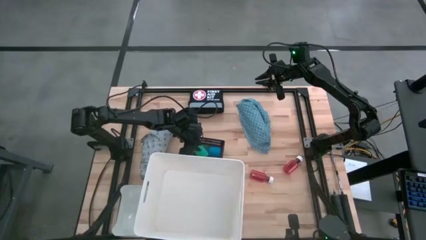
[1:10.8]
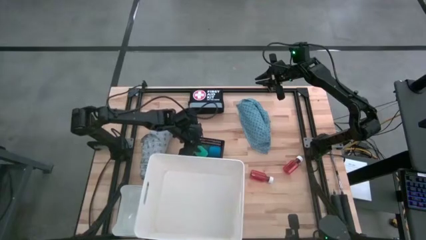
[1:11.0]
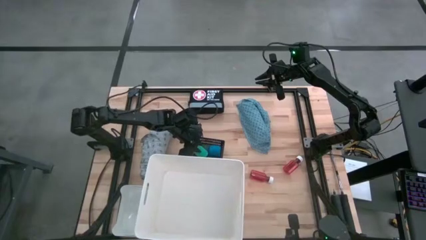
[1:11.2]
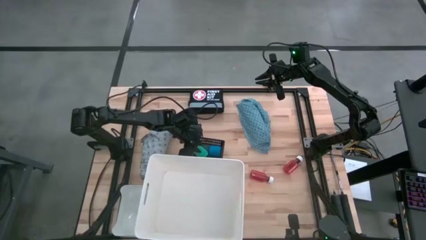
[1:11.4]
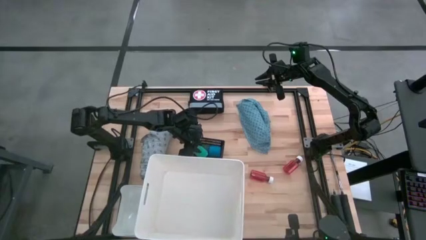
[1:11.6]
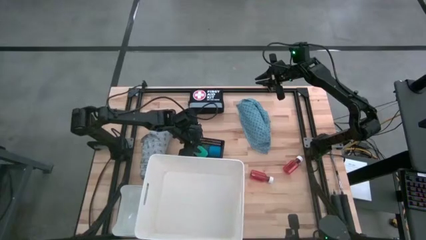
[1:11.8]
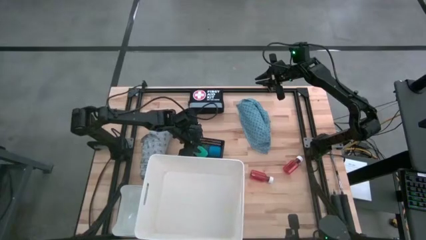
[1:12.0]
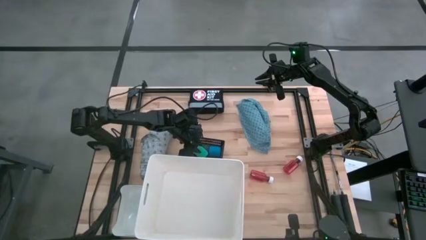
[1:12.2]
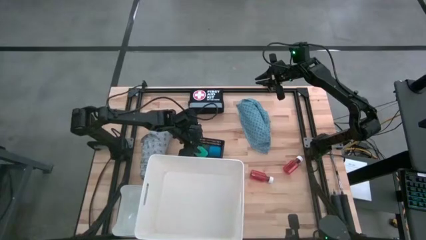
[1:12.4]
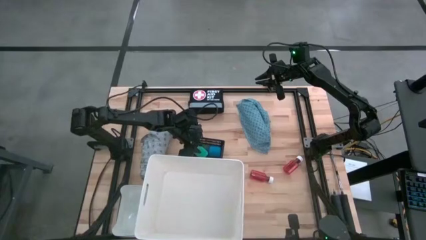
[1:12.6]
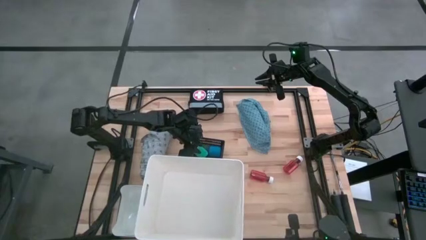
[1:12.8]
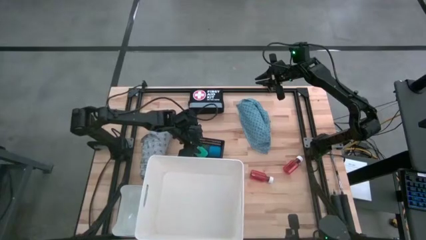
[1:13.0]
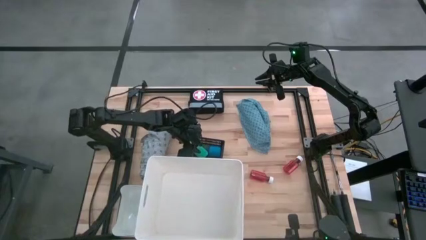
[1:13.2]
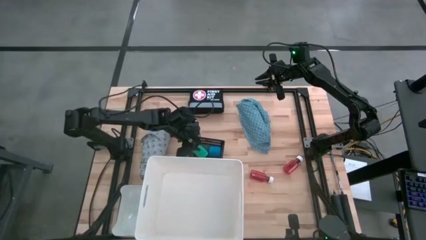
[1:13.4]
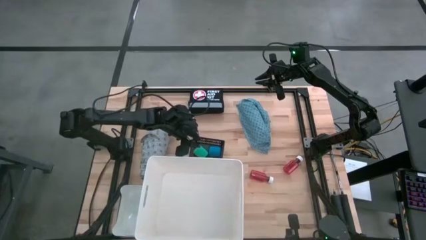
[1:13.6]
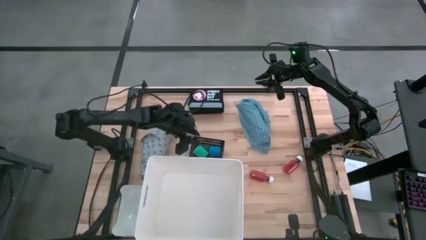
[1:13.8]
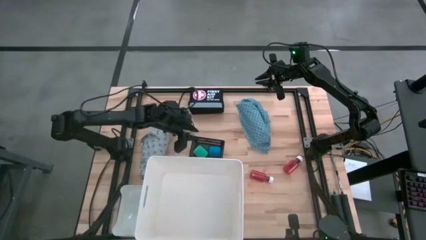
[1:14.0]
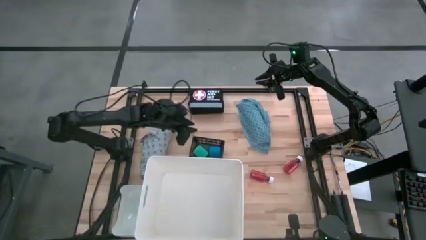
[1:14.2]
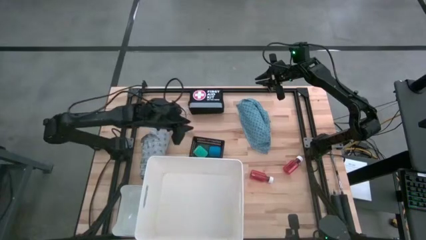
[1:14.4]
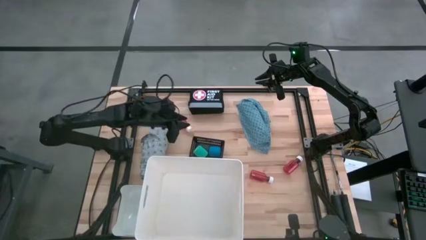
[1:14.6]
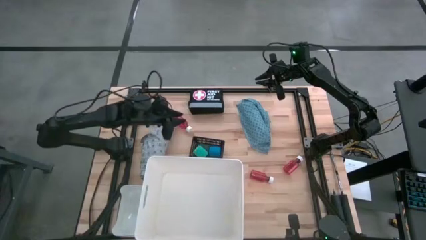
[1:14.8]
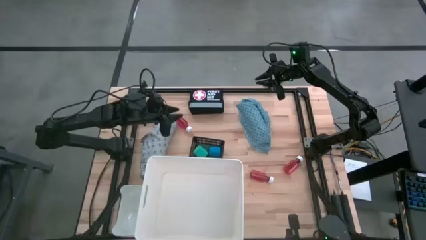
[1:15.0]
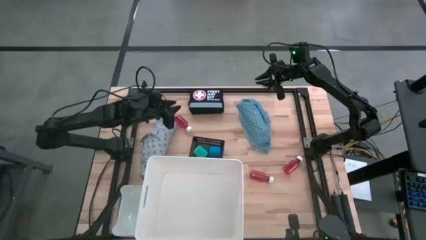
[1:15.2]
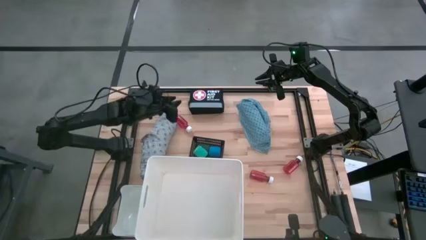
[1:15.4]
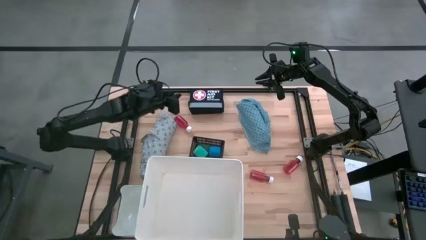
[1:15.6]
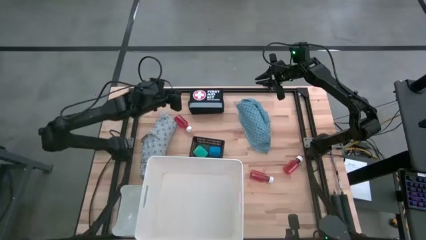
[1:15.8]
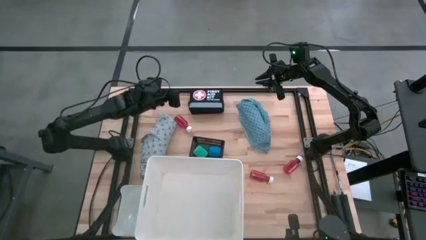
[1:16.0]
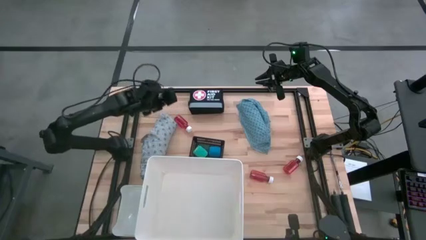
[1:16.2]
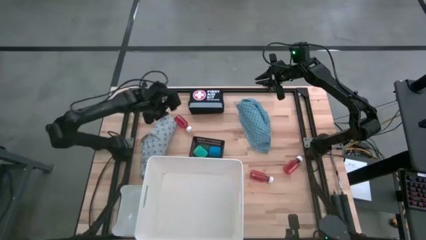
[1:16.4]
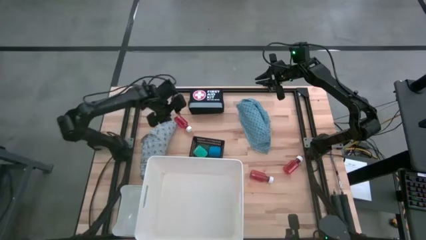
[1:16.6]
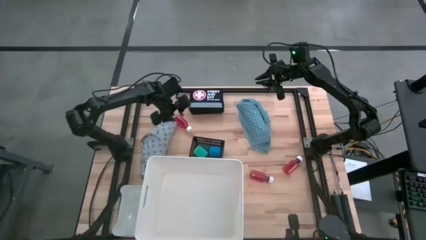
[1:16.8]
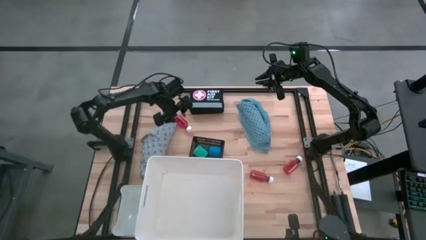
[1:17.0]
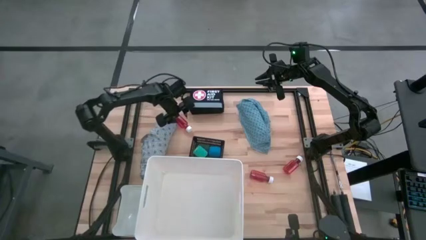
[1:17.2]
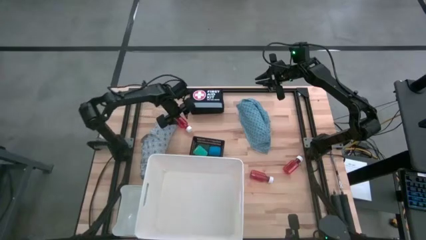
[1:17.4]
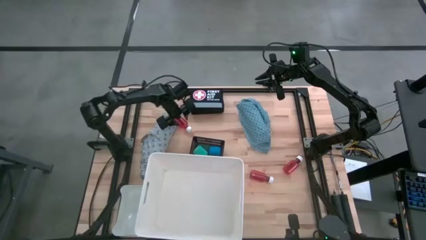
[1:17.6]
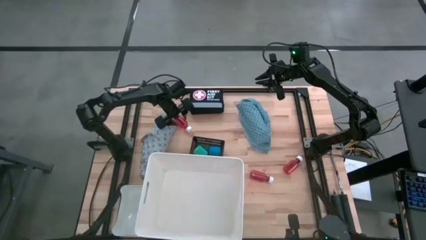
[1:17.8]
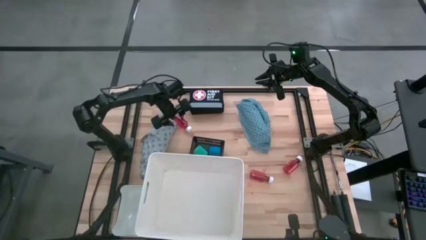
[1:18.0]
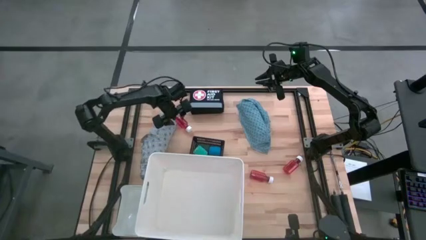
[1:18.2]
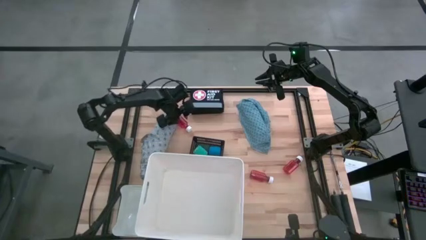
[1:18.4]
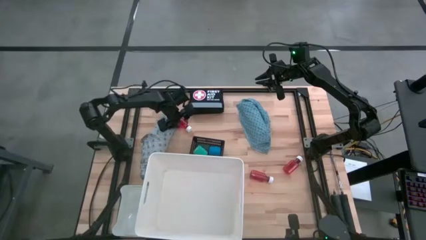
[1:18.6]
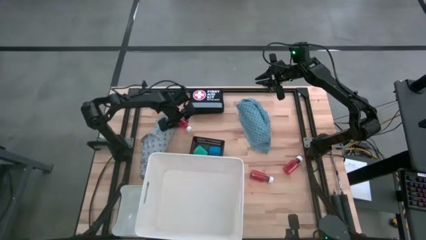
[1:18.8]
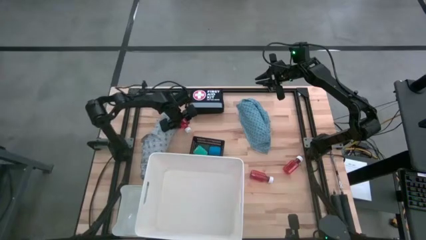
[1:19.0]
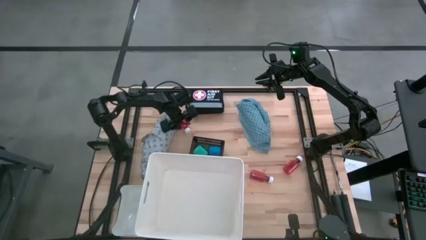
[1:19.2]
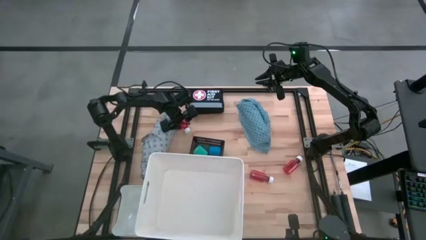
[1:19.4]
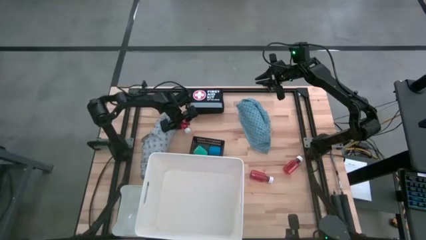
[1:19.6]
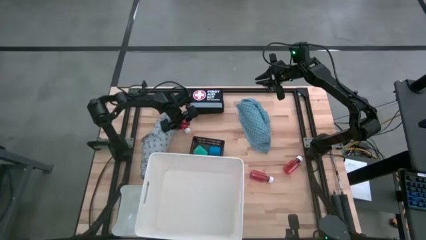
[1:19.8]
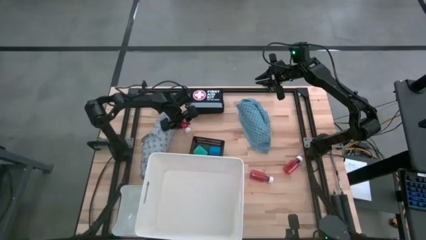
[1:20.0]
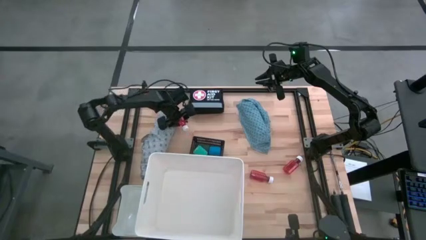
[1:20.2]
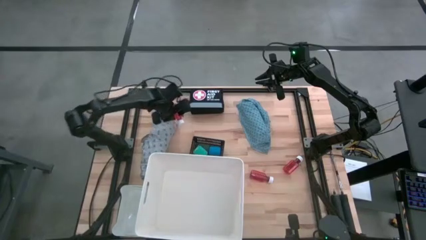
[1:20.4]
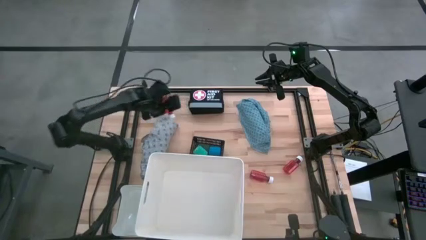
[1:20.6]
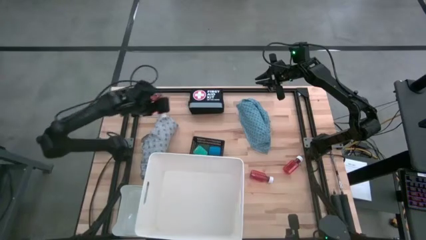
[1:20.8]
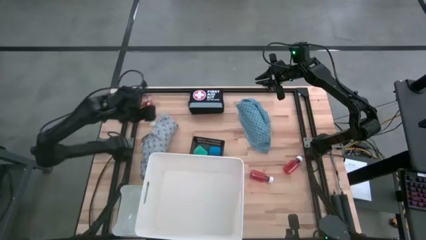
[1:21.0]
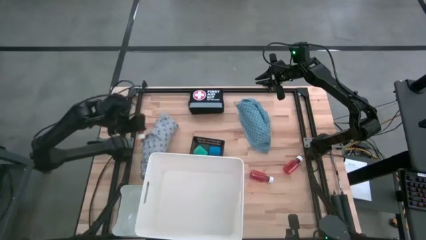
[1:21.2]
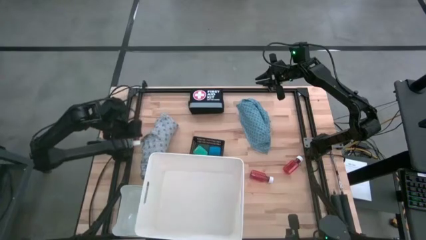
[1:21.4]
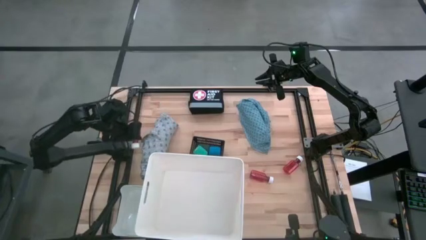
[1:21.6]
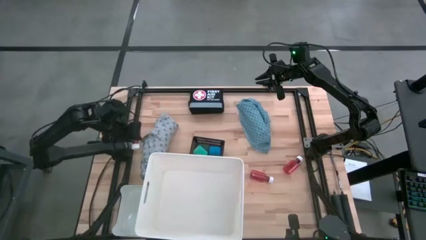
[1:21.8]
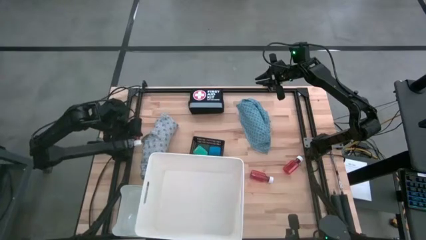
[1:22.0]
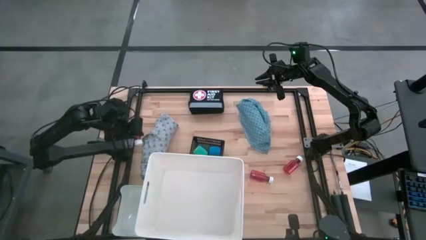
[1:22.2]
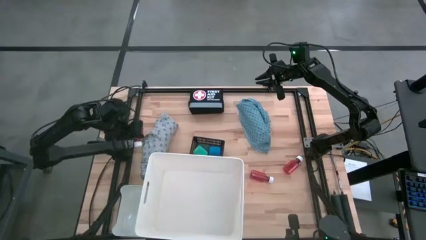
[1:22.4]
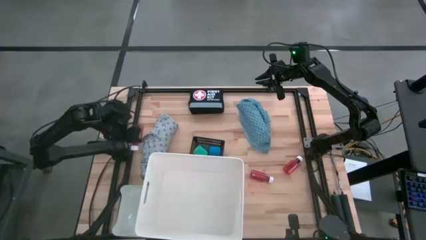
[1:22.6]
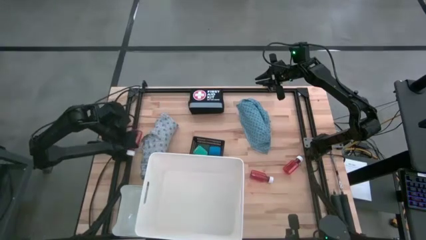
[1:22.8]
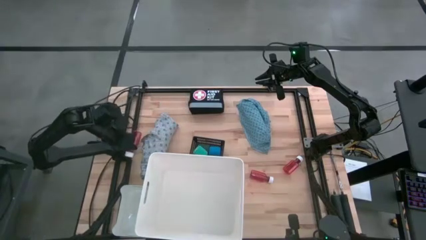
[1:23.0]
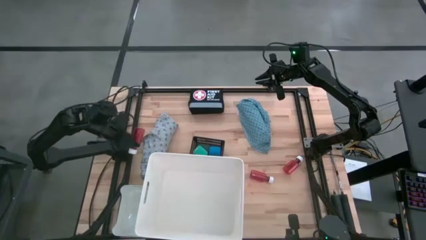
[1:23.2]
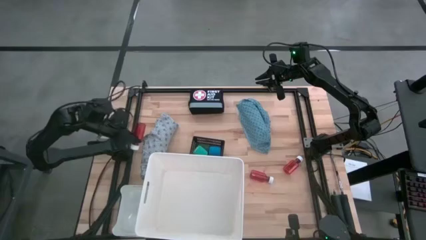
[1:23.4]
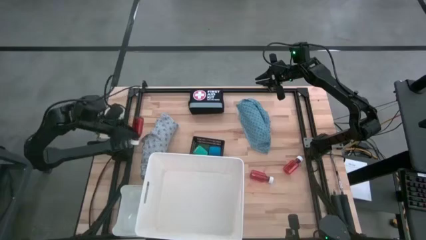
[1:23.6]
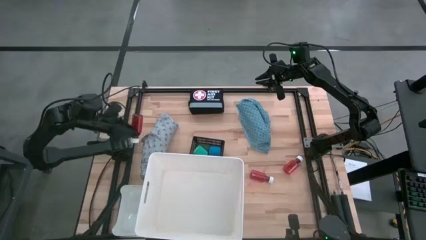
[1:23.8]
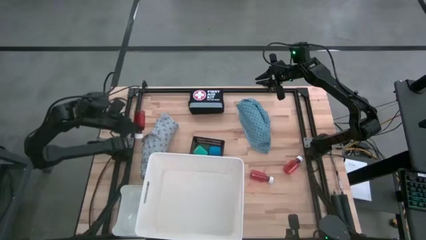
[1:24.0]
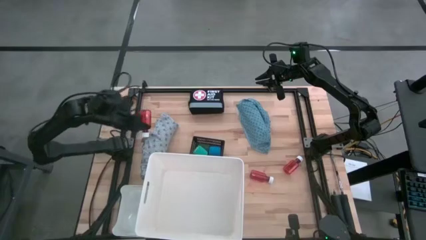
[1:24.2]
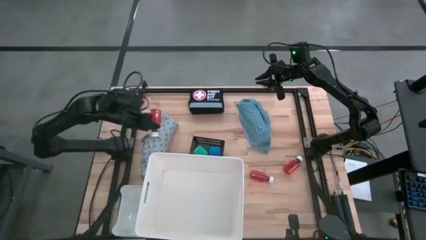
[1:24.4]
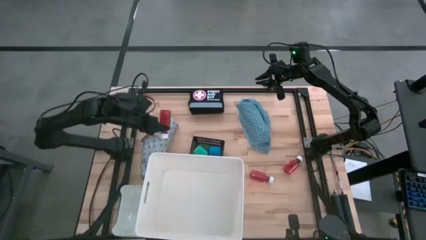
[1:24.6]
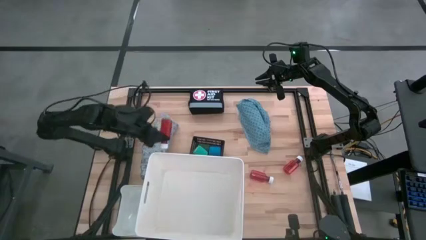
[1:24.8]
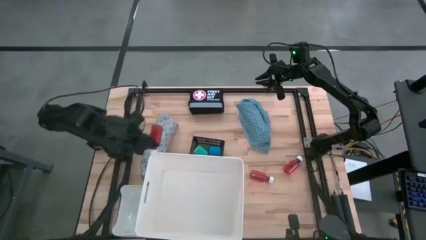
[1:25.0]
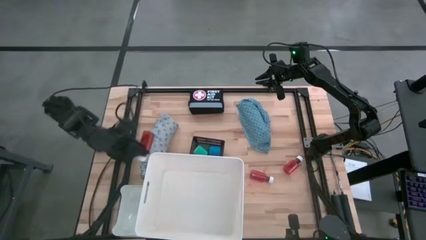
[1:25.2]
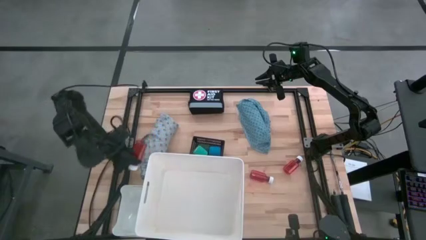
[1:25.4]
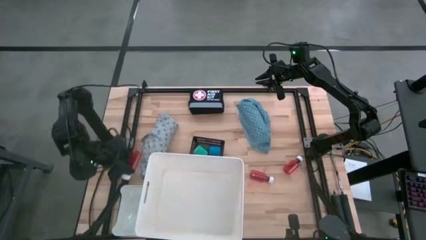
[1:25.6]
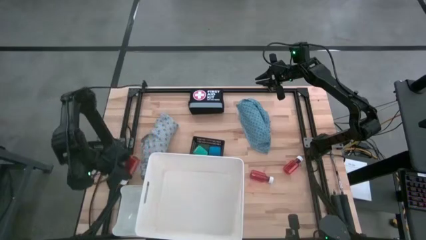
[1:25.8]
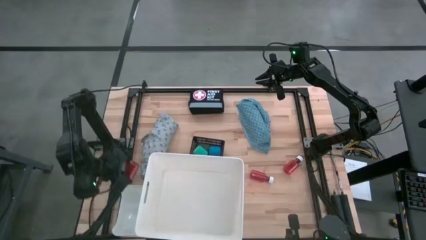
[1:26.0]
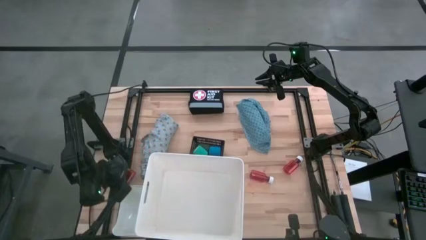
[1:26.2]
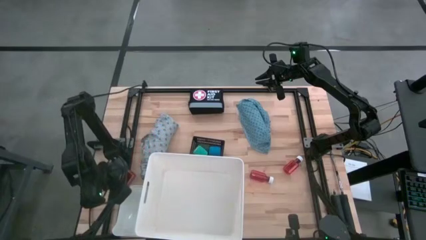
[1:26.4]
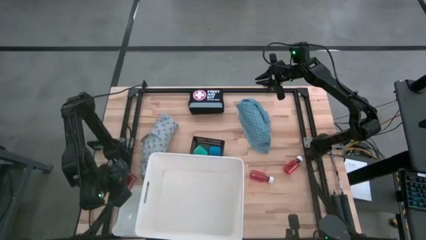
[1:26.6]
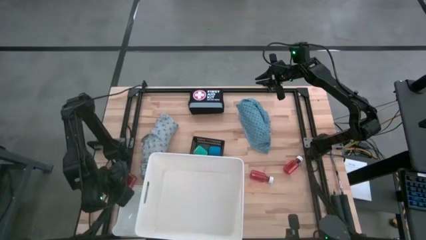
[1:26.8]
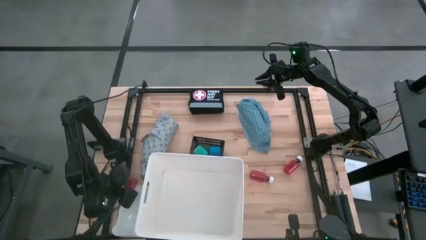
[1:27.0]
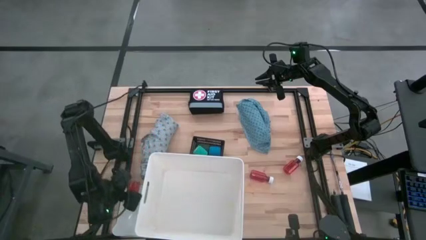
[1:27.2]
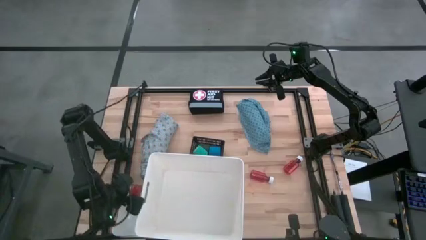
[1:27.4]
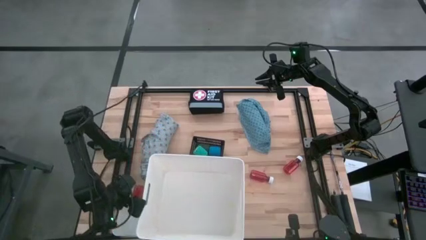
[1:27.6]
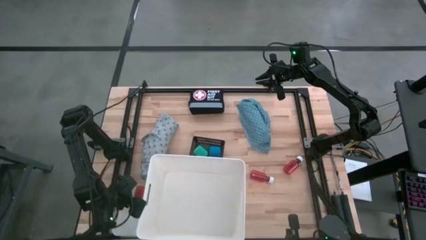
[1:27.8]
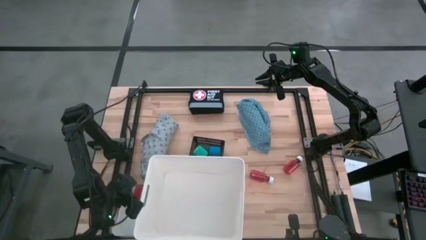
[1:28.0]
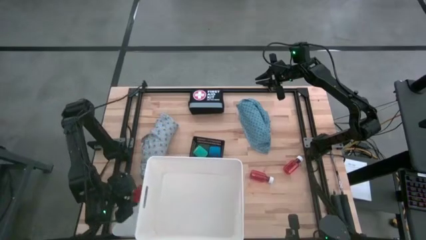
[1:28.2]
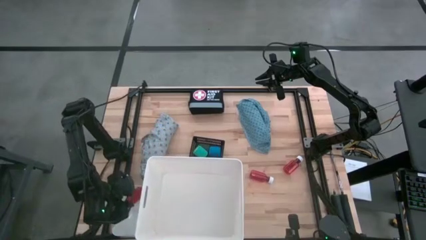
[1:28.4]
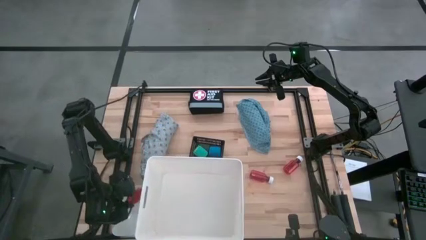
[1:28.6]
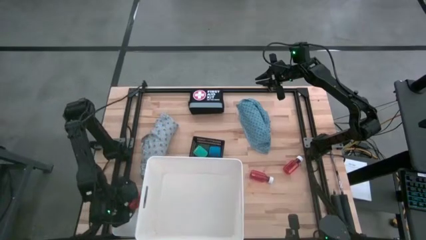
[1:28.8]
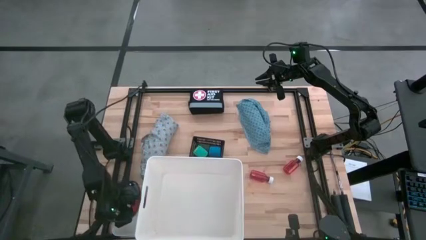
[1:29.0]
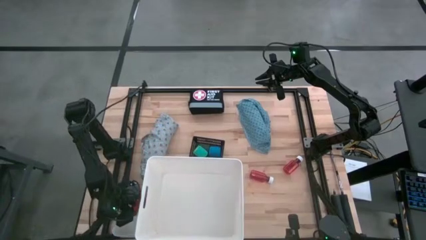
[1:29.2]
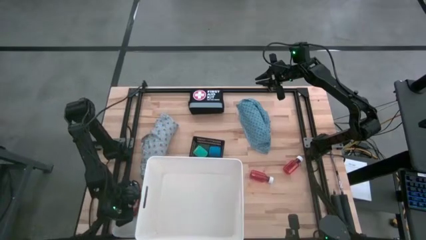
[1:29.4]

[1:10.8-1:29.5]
Task: Pick & Place Medicine items
Put the top left red medicine bottle into the white bin
